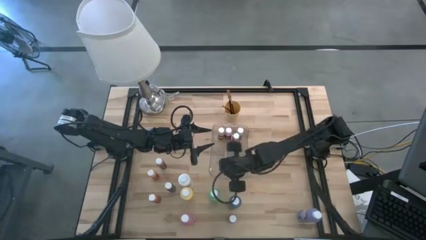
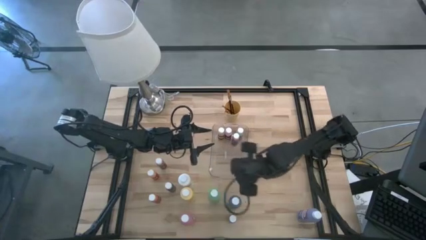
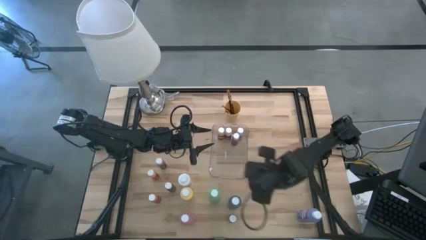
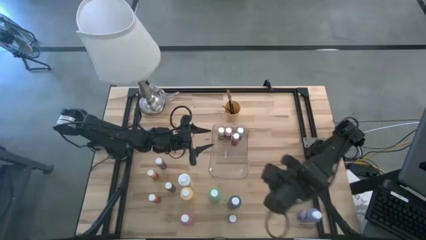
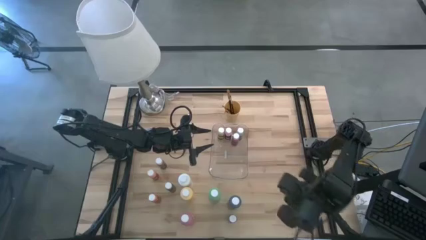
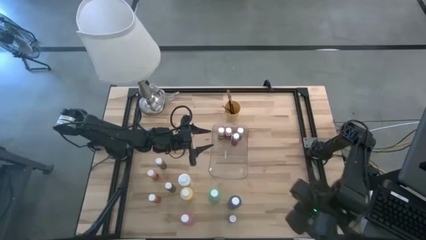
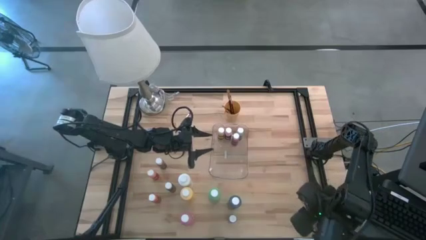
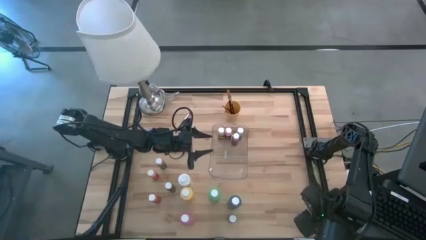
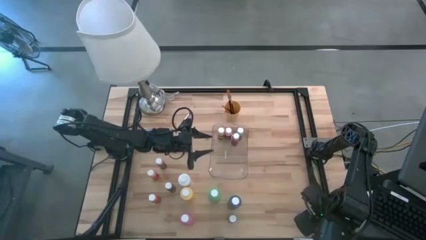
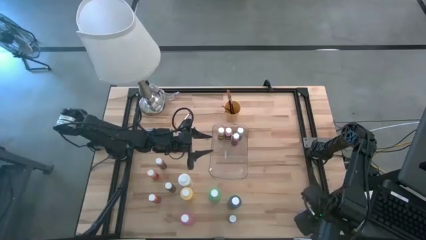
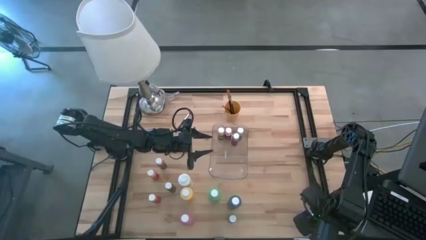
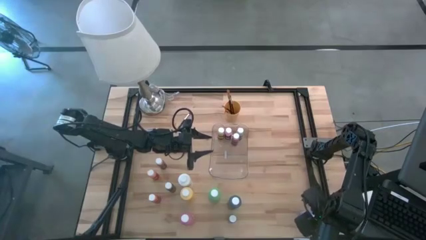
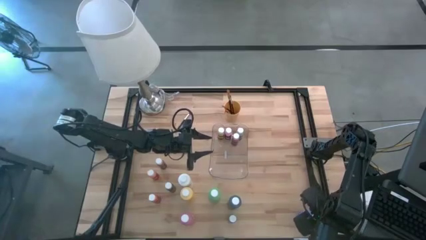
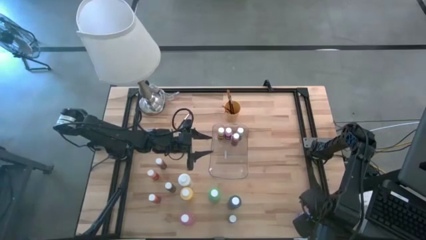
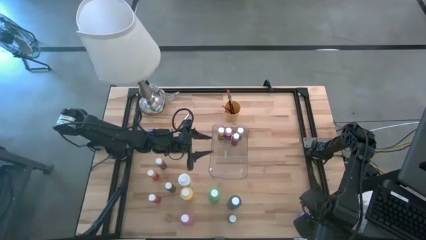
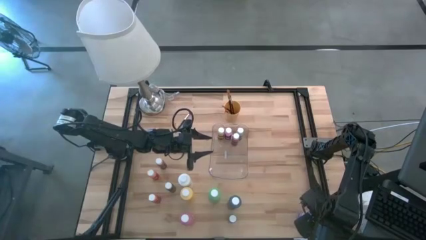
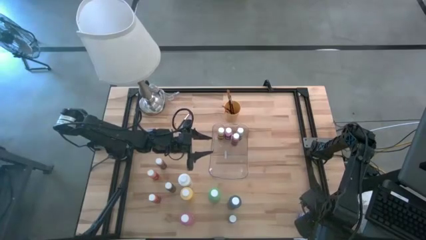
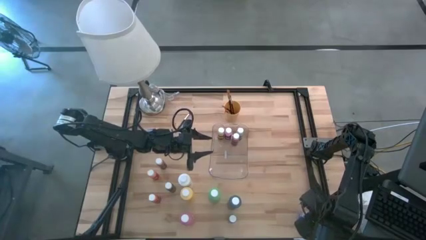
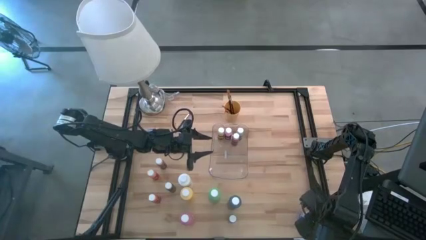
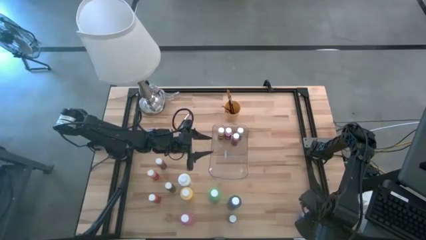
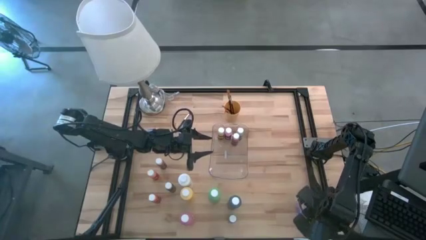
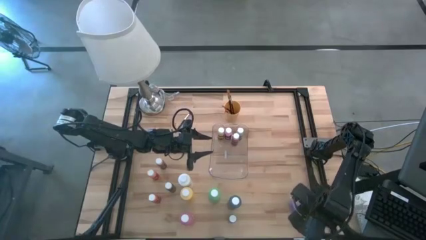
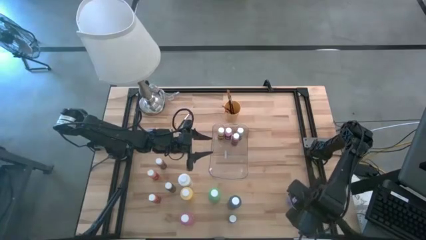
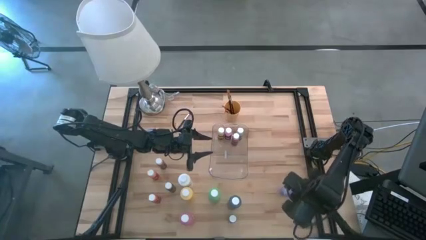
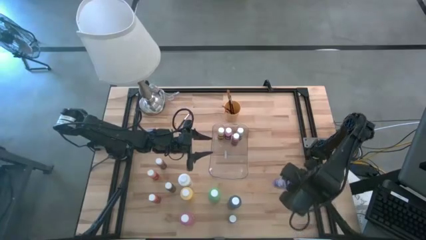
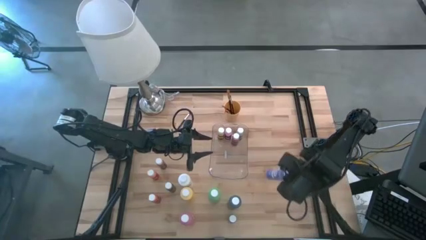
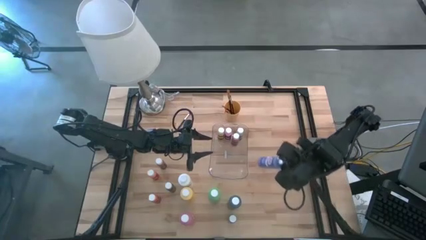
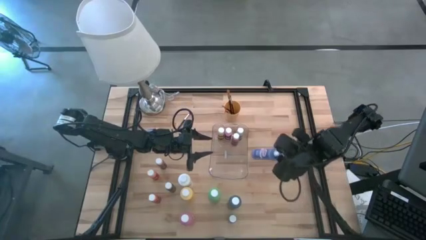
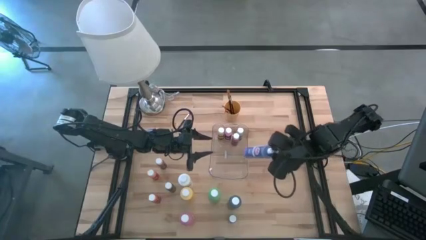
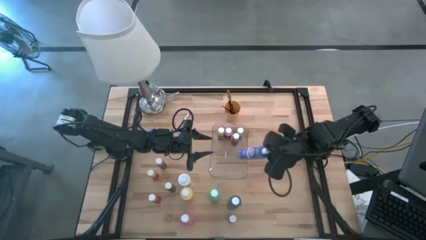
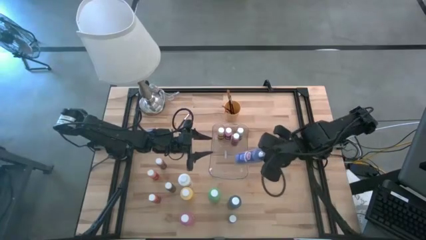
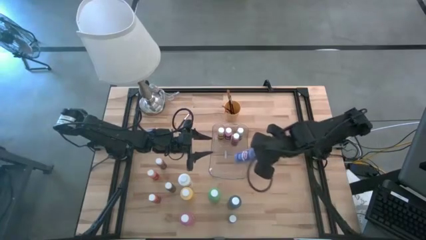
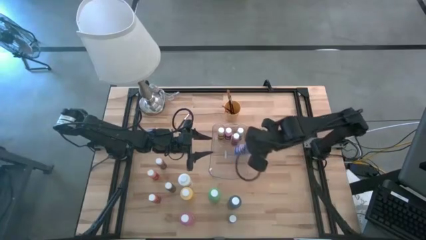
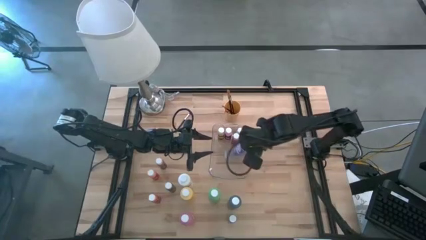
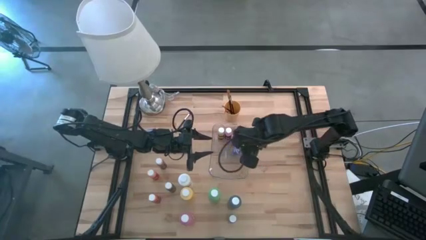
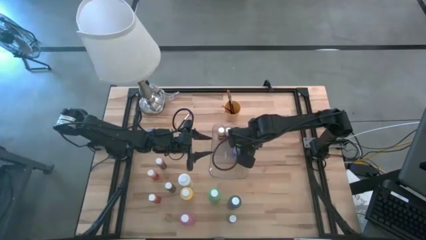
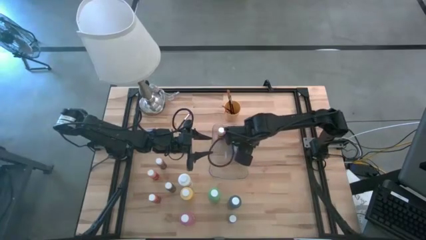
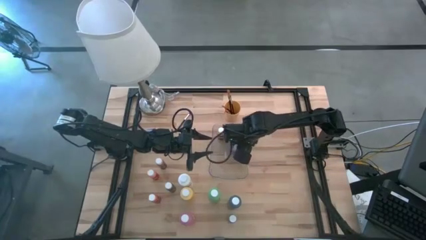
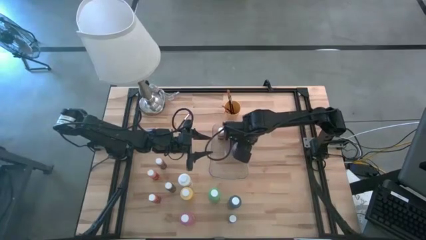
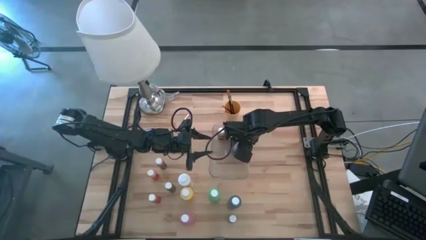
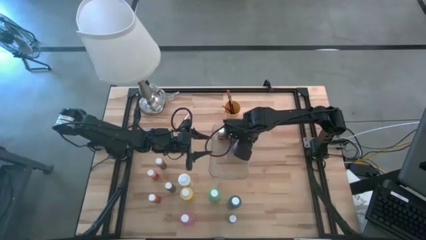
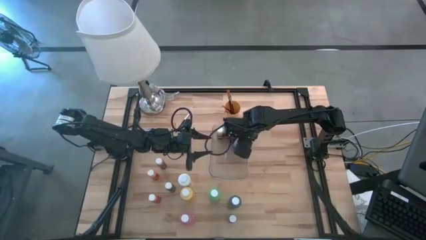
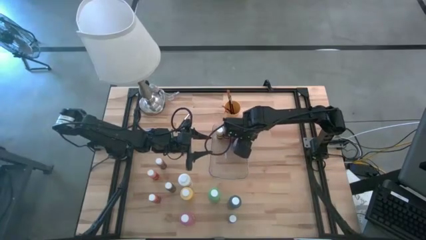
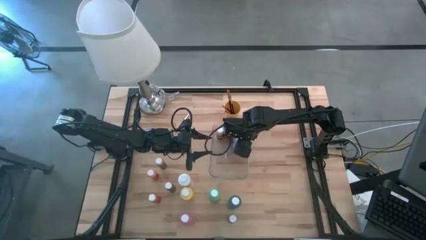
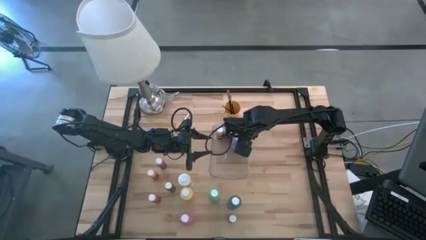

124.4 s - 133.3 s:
Task: Pick & Place Paint Supplies
Put the large blue paint bottle into the transparent bin

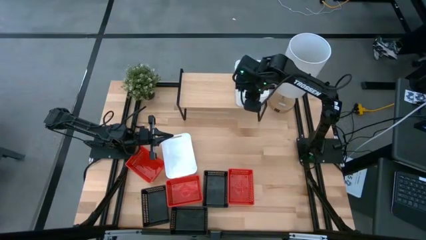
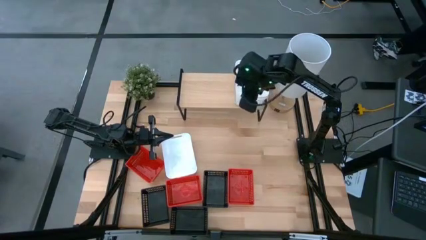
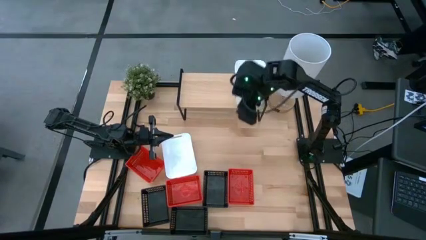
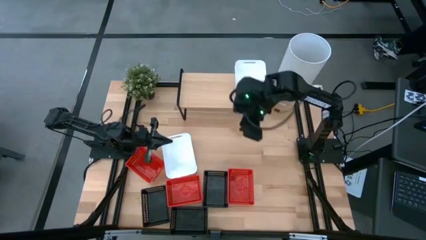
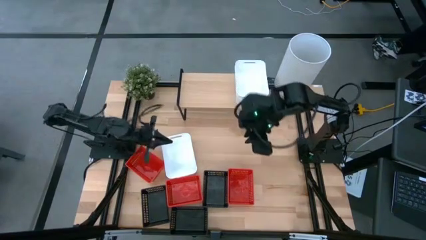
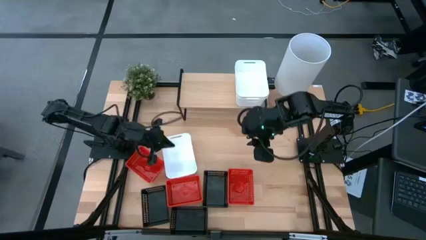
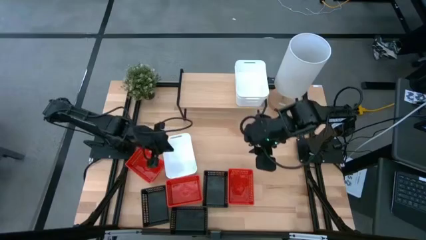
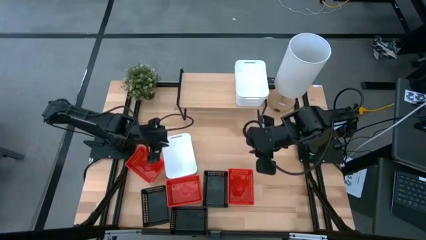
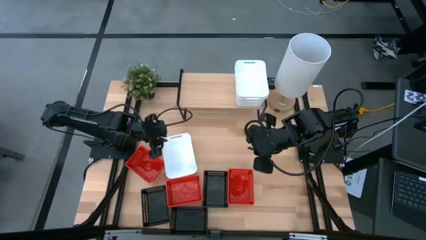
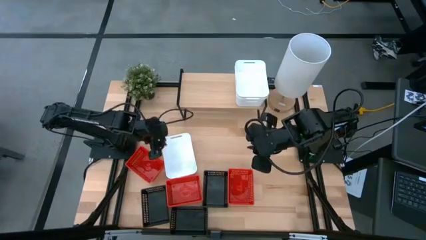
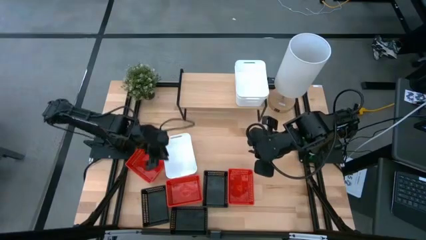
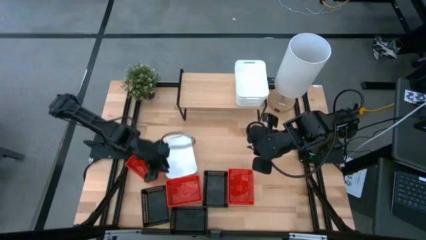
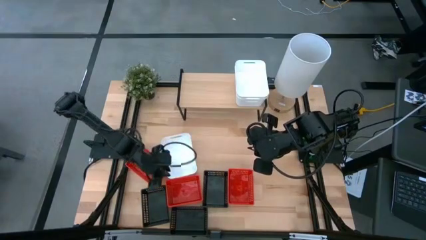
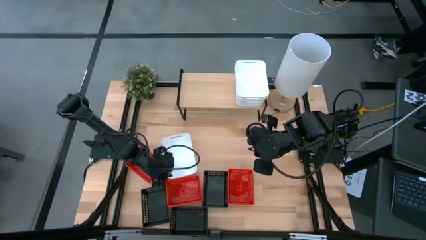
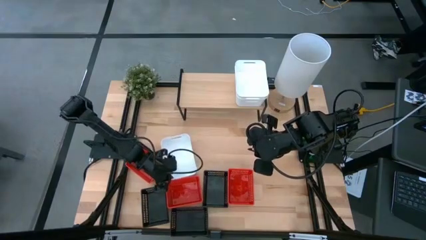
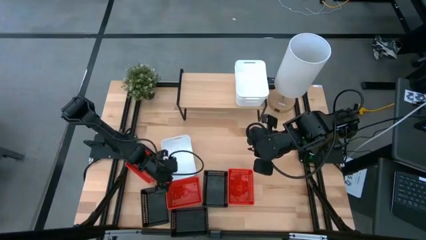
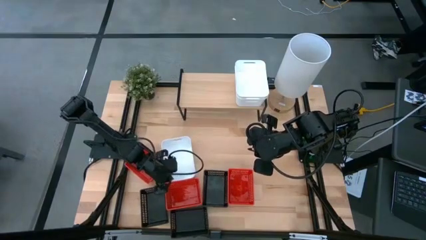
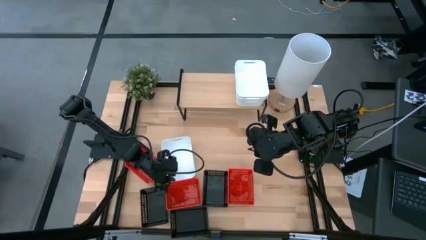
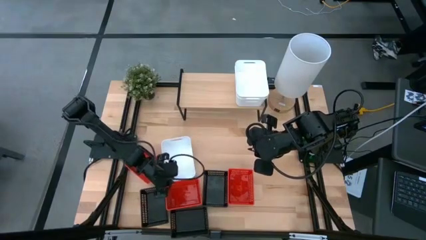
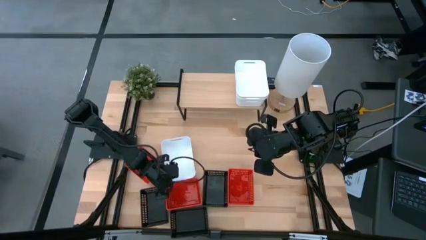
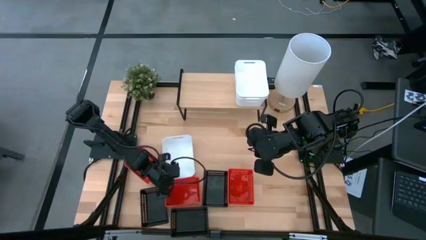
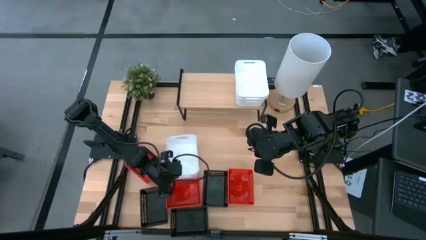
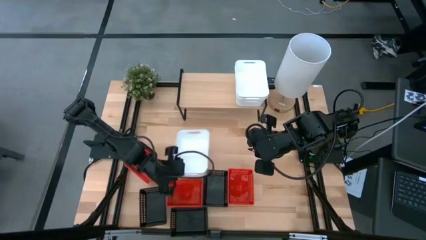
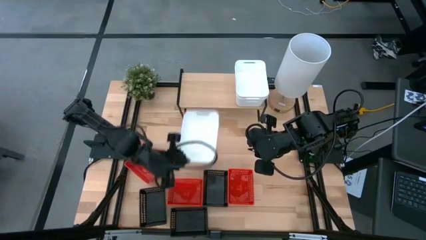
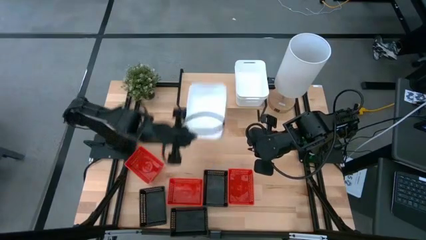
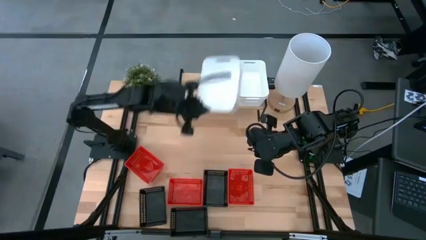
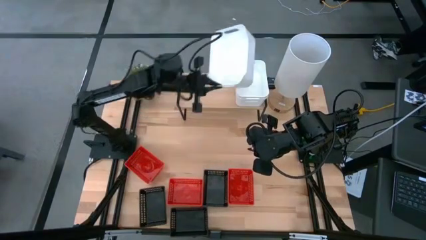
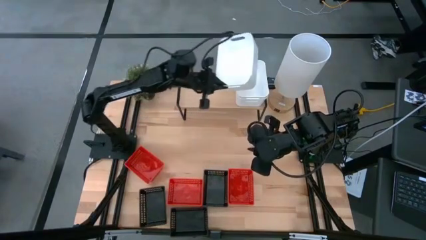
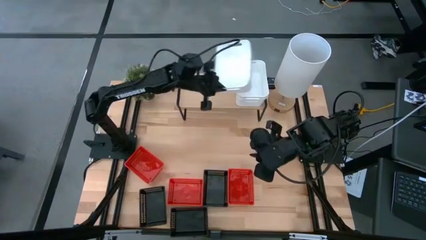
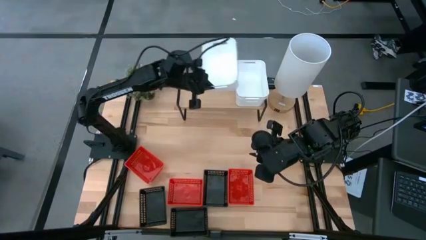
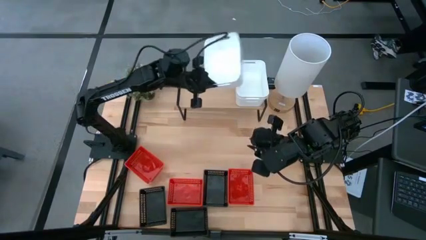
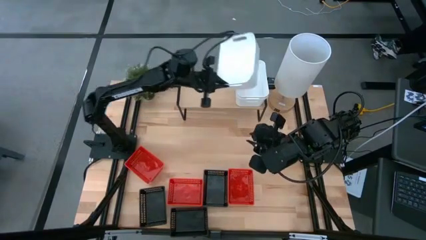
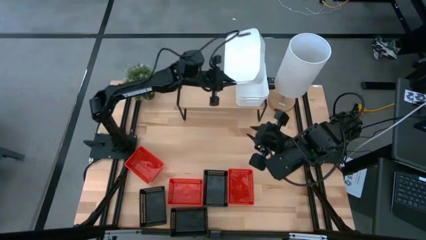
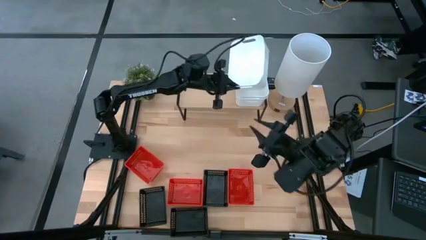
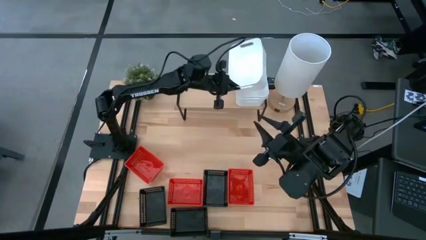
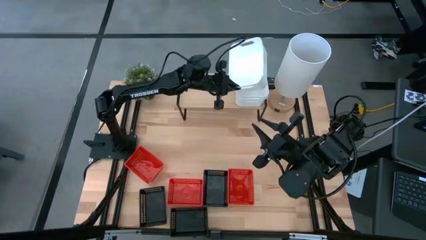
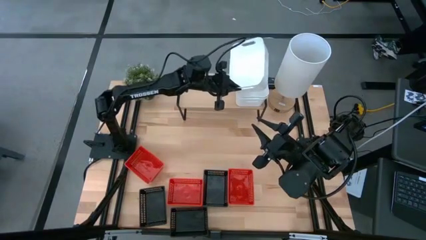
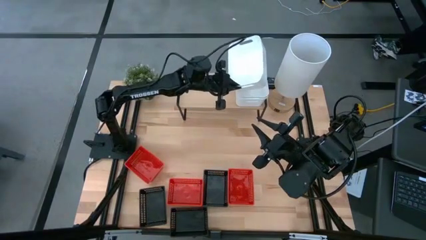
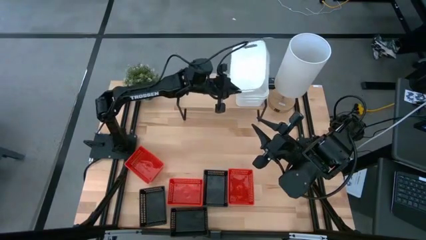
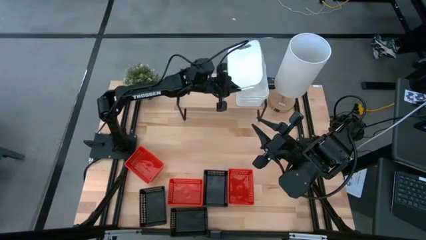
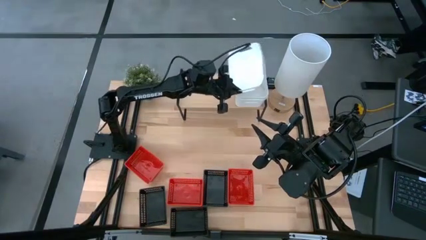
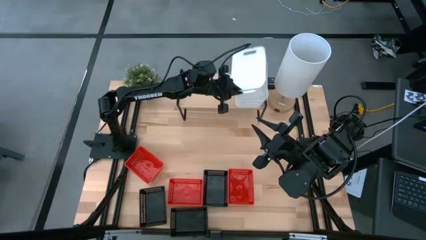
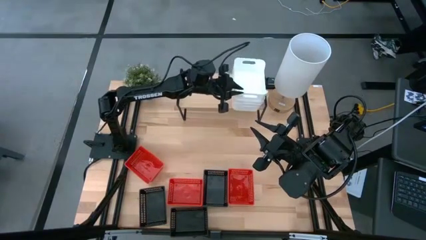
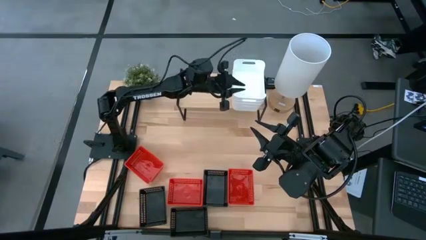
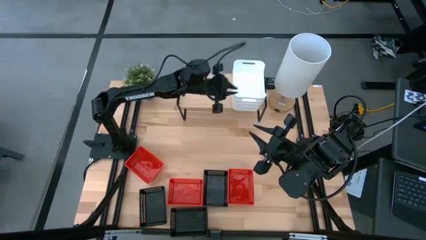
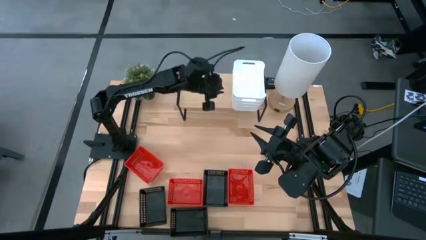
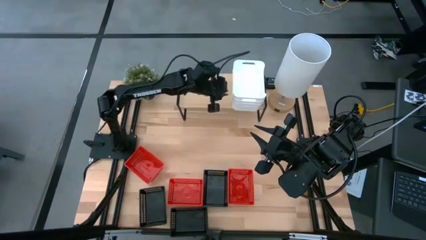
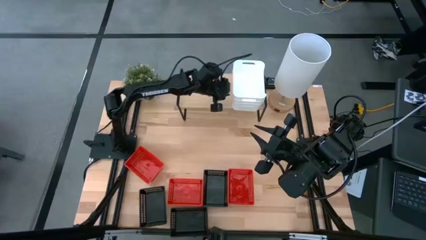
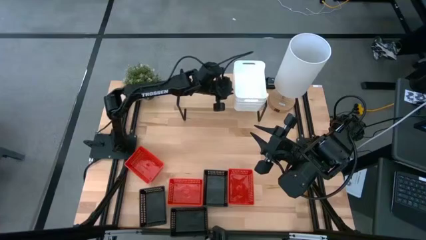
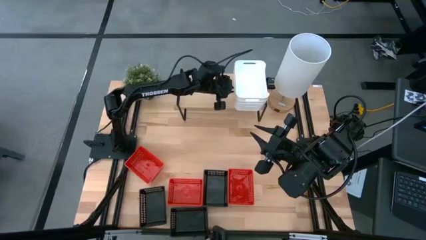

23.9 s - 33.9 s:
Task: Stack baskets on shelf by color
Stack the white bin on top of the stacked white bins on the shelf
